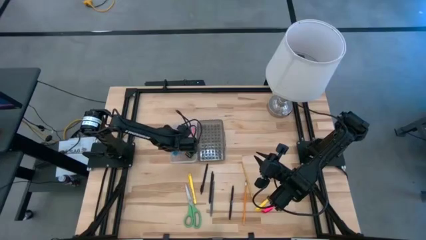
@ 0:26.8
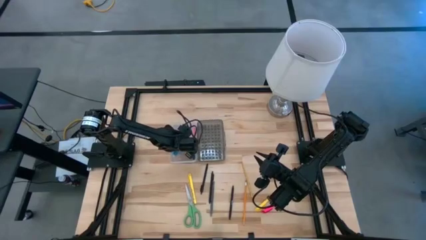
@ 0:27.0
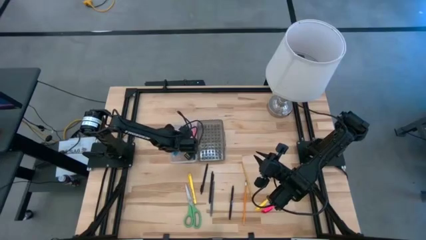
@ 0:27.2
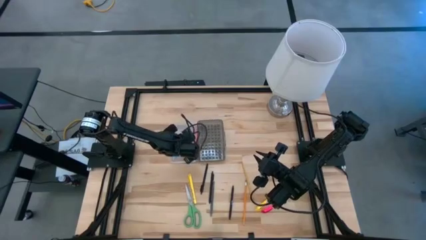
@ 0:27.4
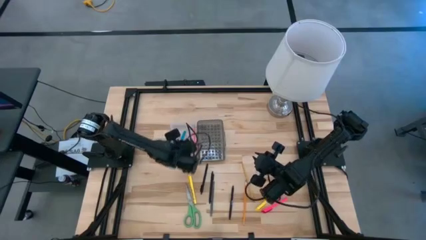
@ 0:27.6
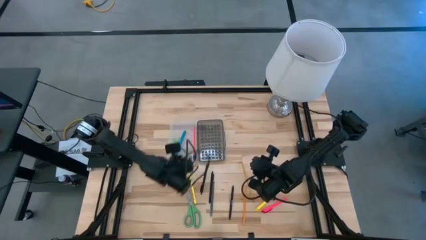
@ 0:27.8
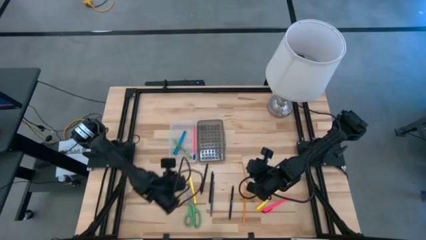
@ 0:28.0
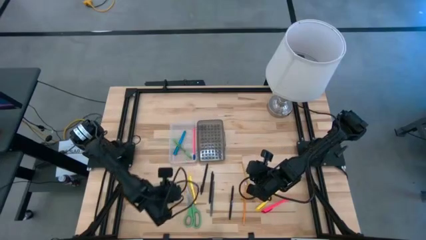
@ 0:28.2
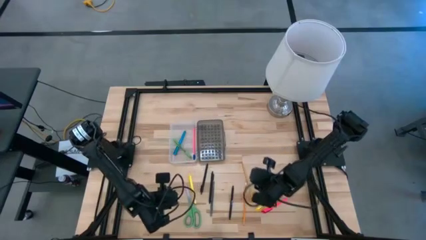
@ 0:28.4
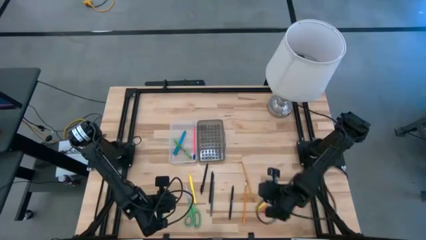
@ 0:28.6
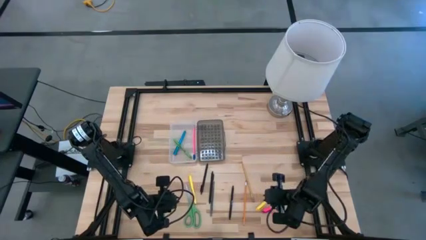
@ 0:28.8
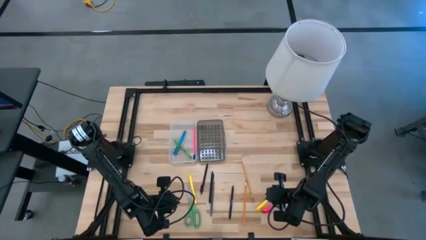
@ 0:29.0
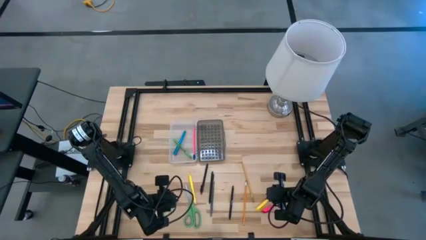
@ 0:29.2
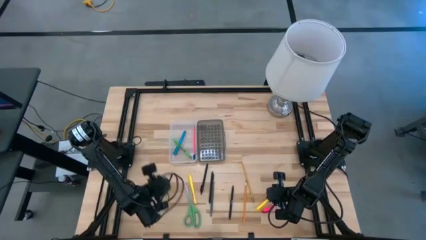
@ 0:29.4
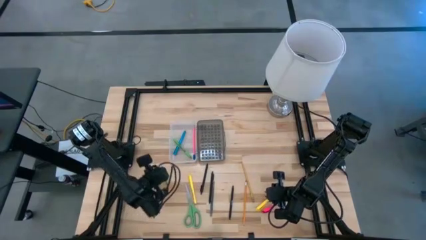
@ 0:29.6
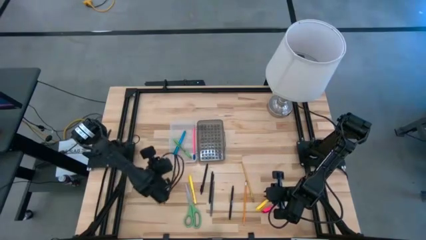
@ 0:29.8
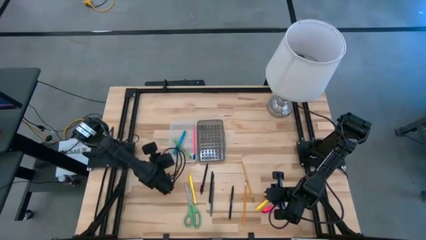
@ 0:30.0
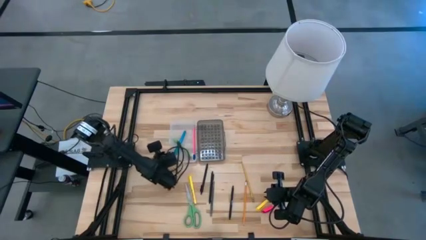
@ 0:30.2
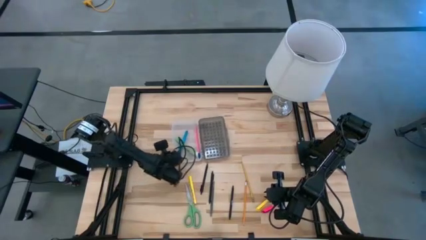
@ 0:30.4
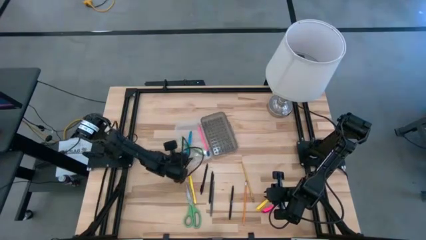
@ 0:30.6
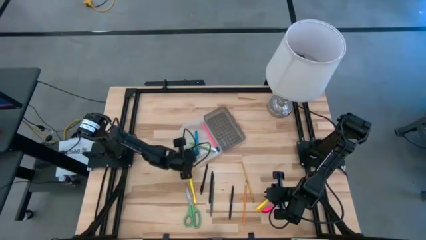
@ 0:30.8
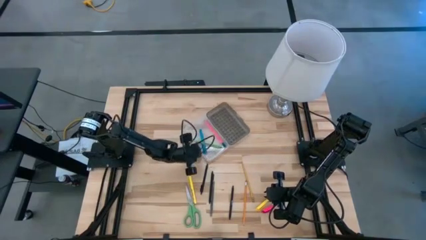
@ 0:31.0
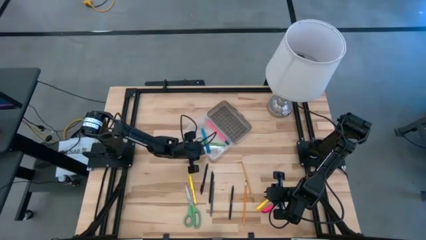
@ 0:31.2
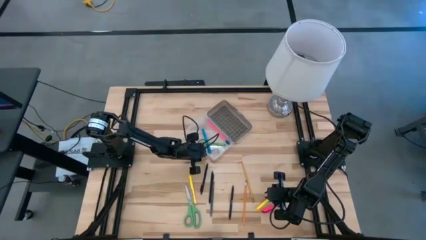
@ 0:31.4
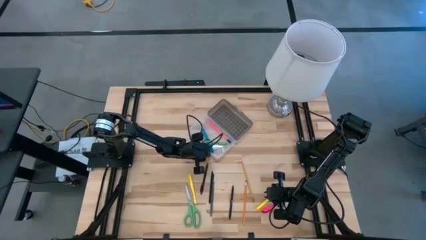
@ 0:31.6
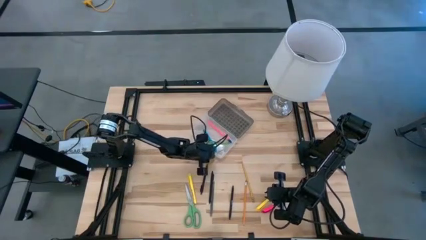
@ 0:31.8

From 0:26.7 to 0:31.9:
Task: Pick & place school supplies into a supply box
Adjust the black supply box

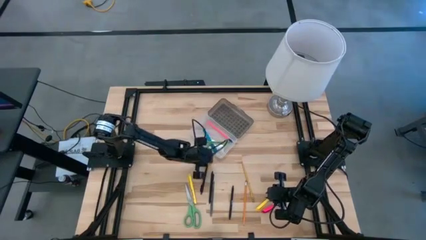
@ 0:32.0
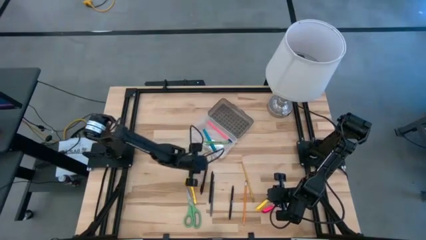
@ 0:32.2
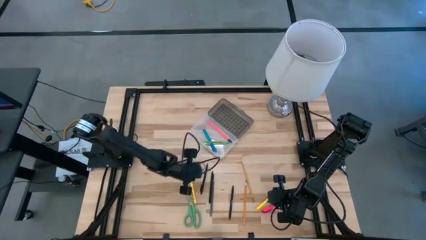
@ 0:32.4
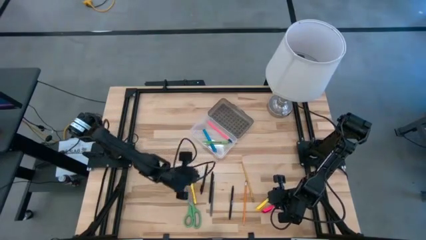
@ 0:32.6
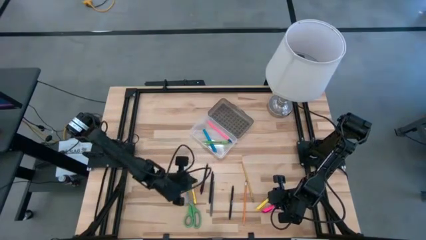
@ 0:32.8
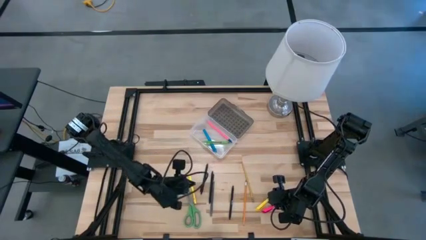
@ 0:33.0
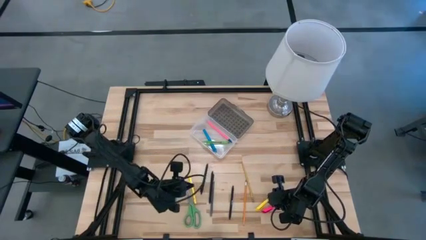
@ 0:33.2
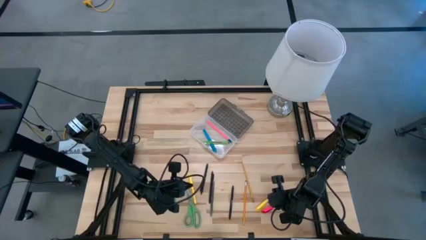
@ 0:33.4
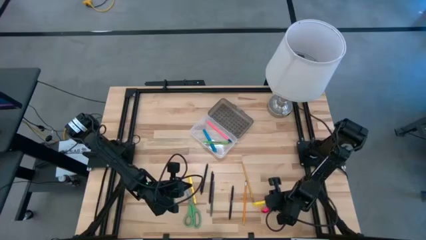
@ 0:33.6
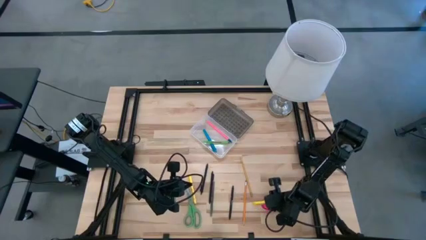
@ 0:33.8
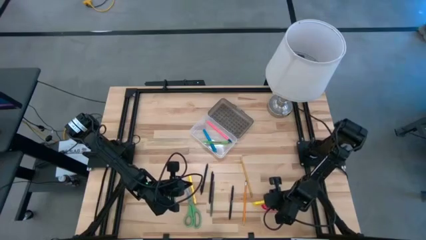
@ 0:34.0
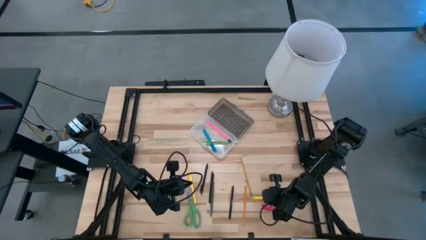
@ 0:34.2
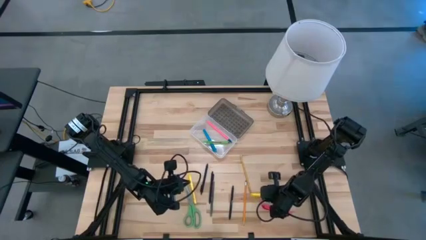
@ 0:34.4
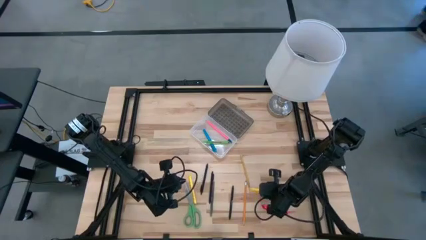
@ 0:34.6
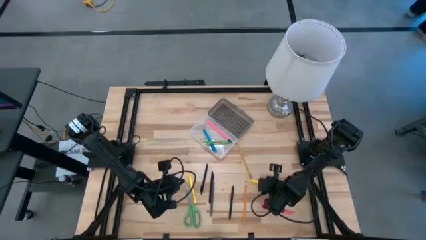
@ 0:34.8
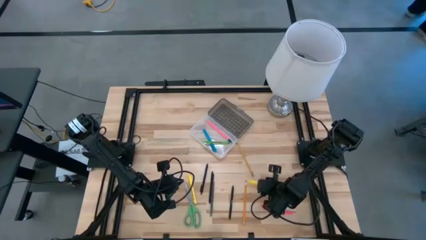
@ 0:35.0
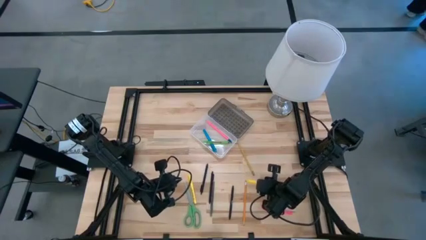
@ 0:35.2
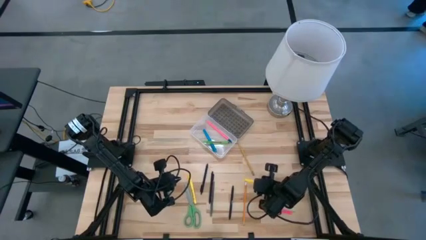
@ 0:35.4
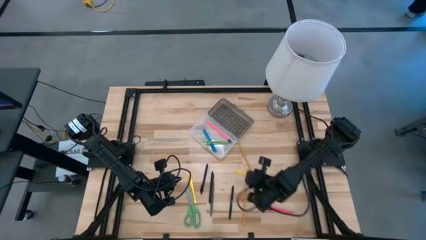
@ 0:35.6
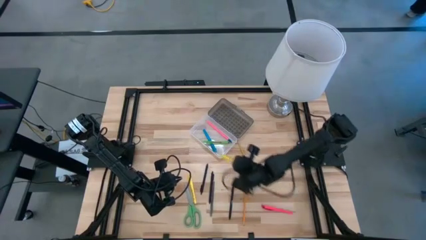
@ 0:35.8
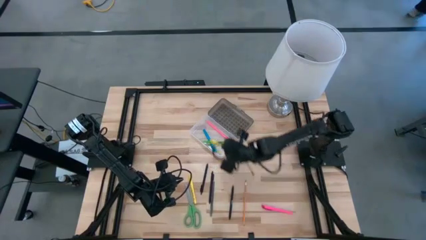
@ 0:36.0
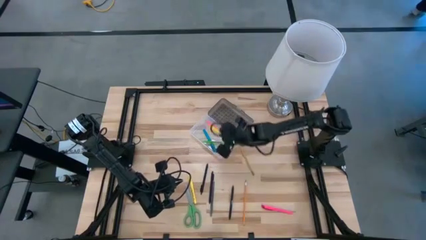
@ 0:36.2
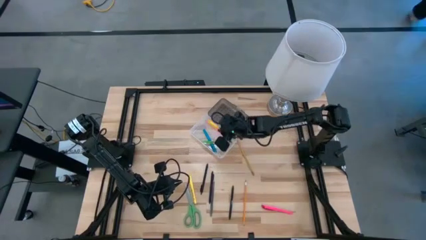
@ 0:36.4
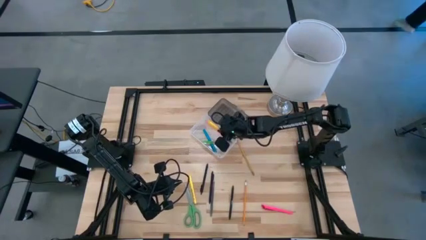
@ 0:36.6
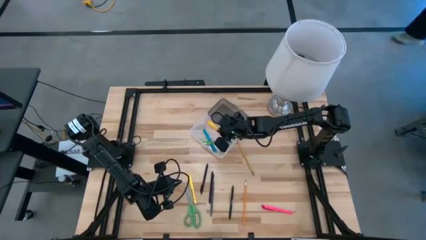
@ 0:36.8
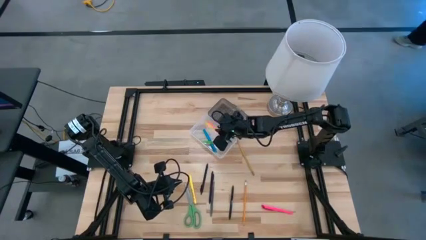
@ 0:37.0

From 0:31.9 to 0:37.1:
Put the right yellow pen into the black supply box

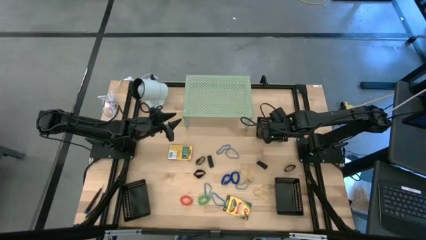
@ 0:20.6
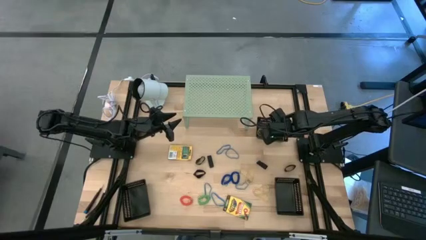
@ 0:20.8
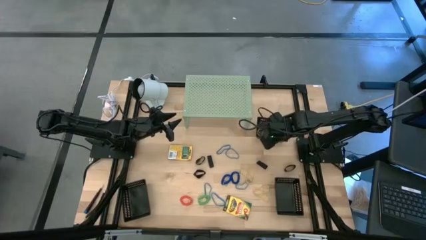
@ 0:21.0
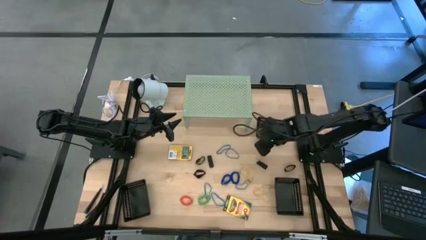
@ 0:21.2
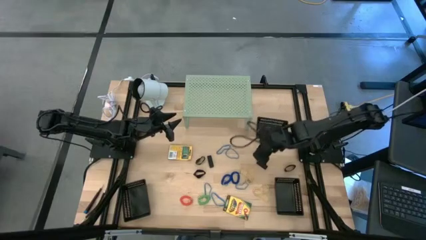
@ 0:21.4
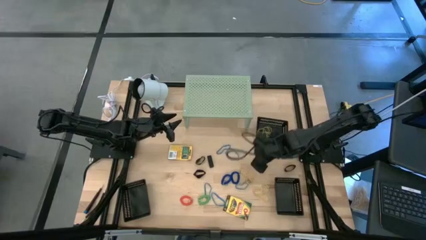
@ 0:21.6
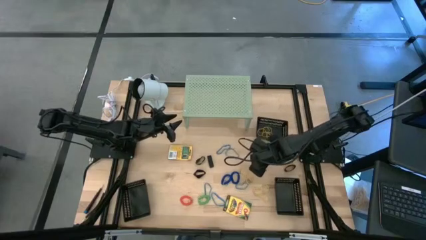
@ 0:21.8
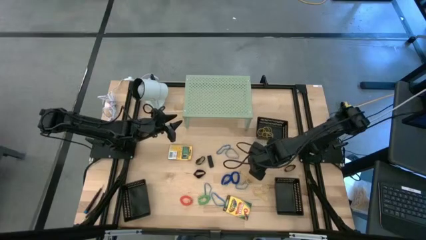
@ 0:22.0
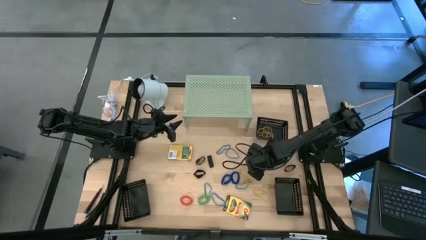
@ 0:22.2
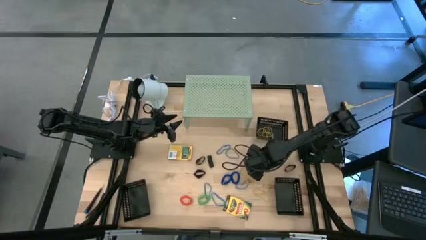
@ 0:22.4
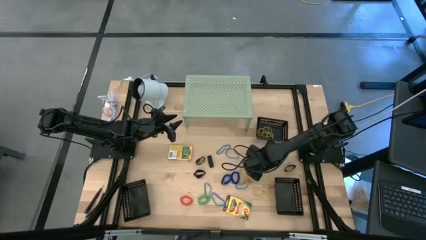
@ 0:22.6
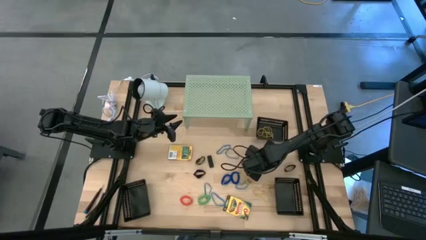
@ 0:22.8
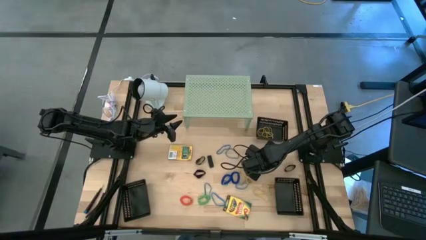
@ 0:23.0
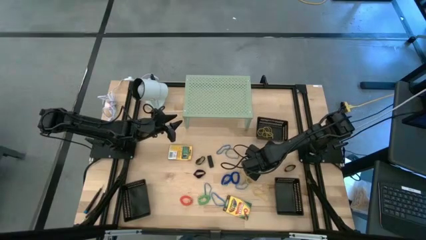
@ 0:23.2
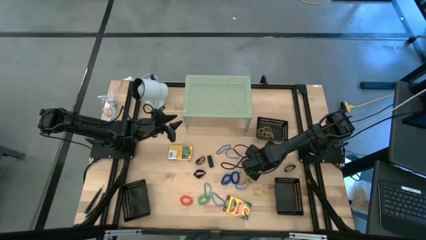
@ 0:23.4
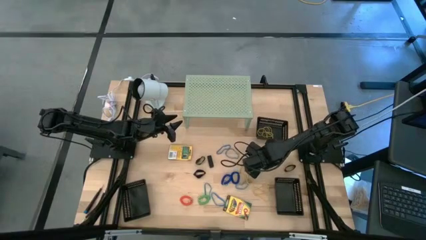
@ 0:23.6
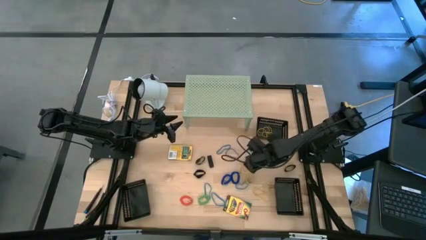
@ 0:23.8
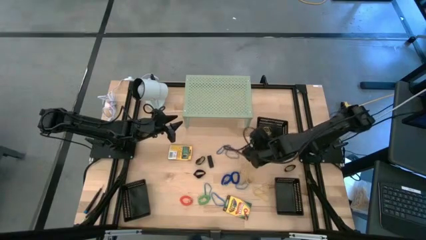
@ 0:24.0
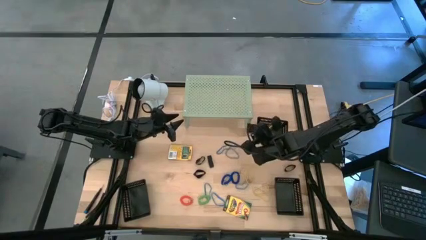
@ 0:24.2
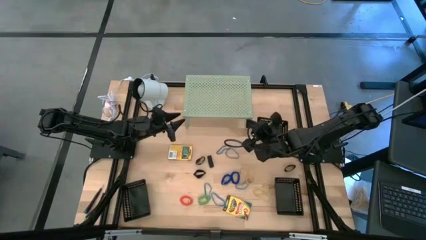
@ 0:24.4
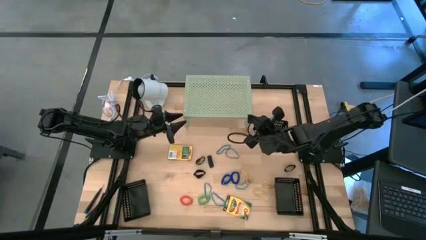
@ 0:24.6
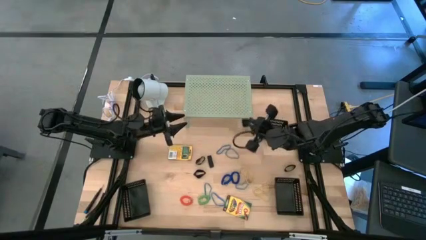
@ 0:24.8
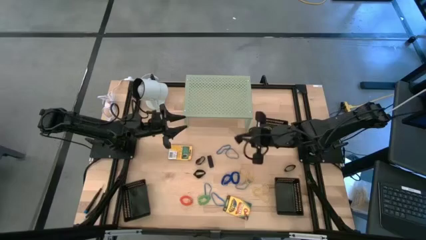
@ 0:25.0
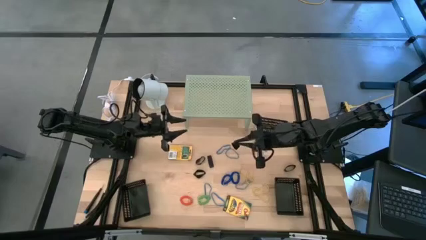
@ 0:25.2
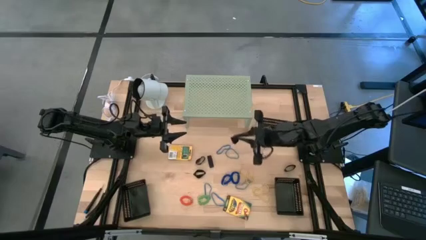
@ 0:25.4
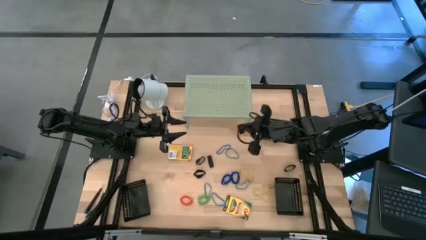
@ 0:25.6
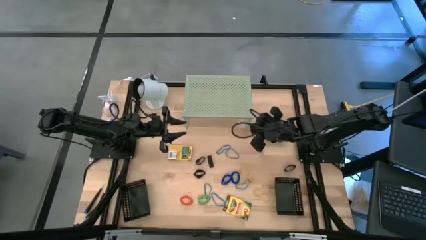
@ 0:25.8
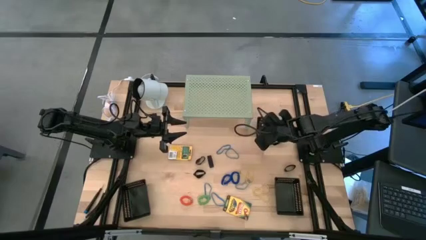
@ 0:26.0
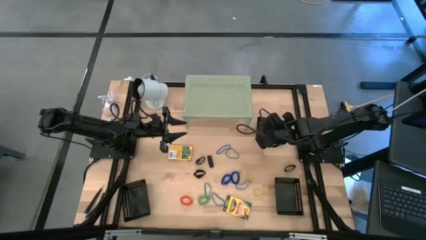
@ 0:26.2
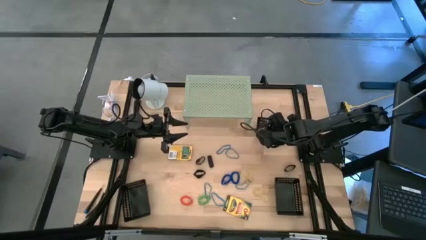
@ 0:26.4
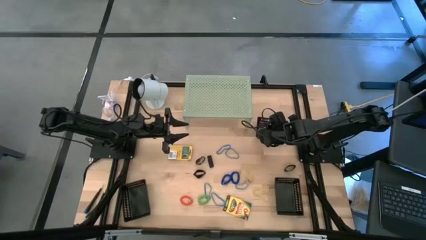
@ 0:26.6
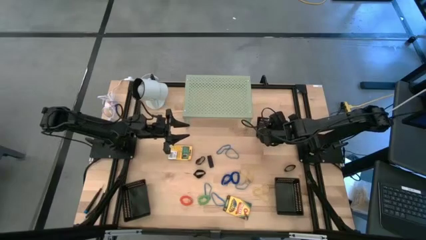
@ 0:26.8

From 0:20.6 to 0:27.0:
Task: Pick & Place Office Desk Supplies
Put the black rubber band into the top right black bin
